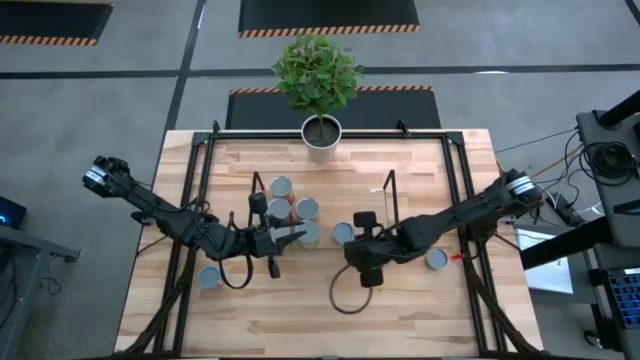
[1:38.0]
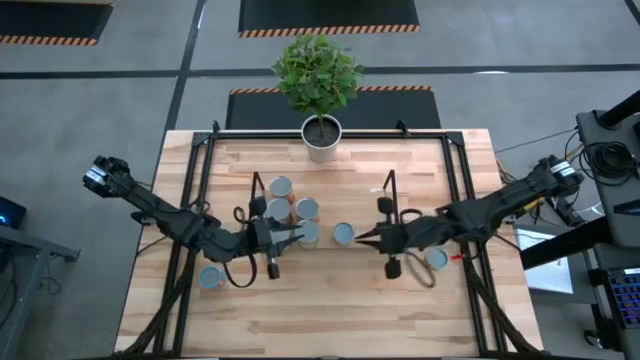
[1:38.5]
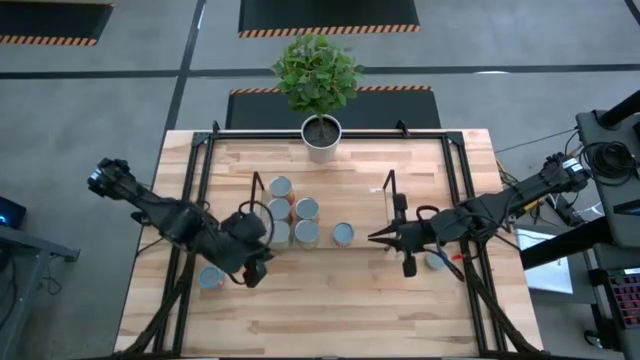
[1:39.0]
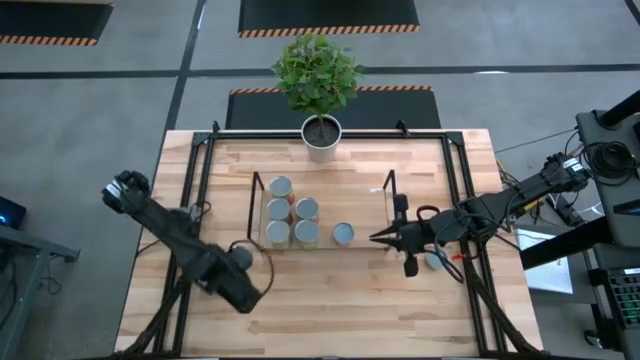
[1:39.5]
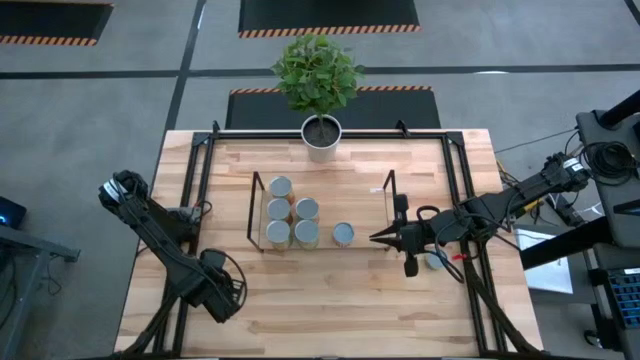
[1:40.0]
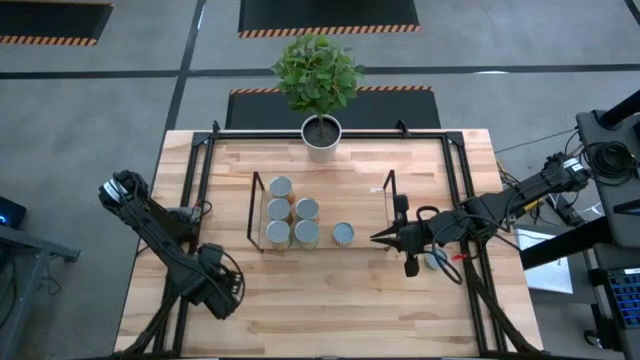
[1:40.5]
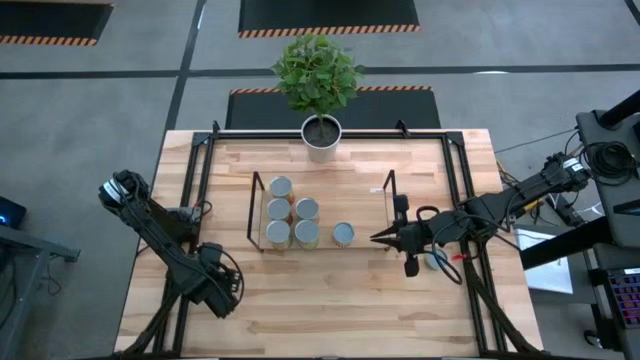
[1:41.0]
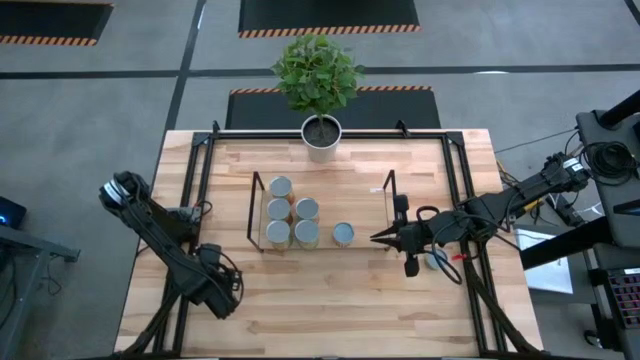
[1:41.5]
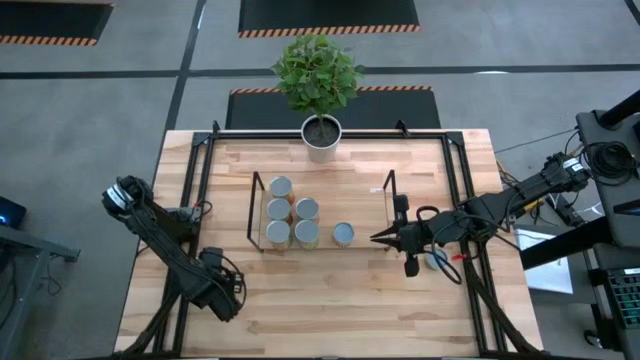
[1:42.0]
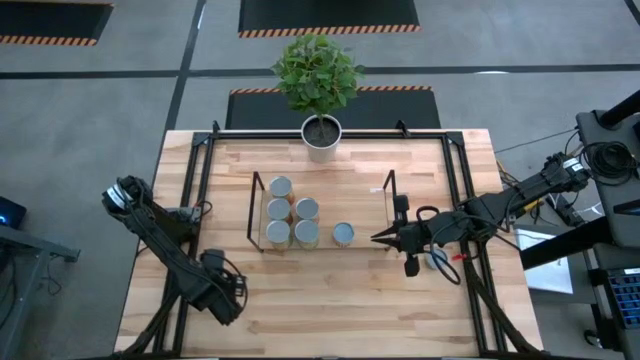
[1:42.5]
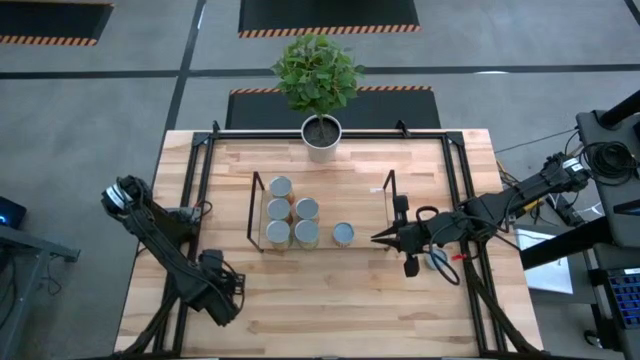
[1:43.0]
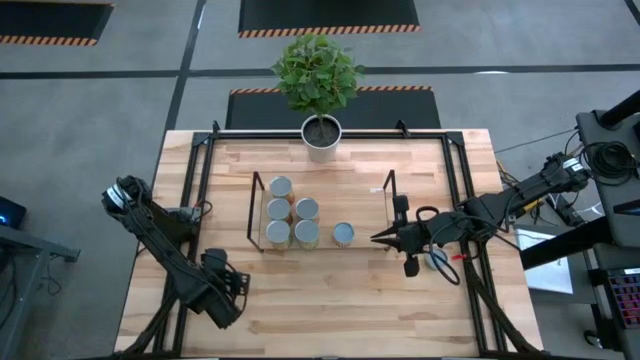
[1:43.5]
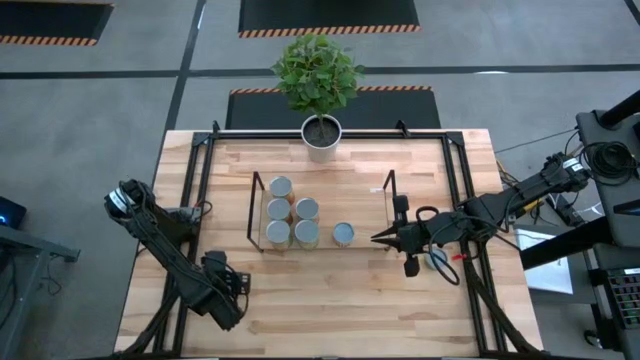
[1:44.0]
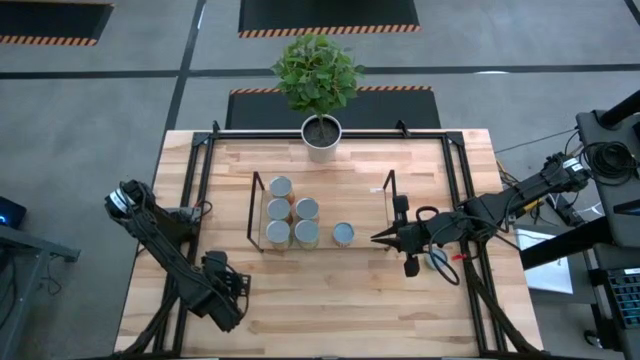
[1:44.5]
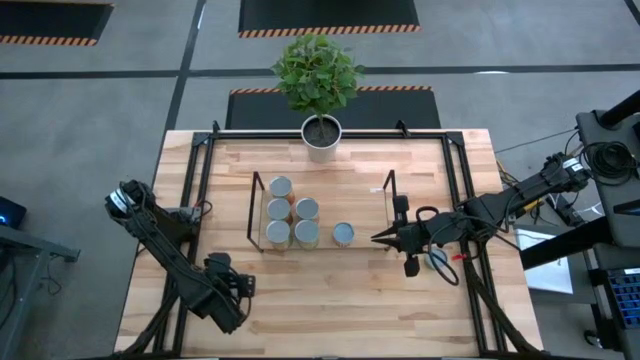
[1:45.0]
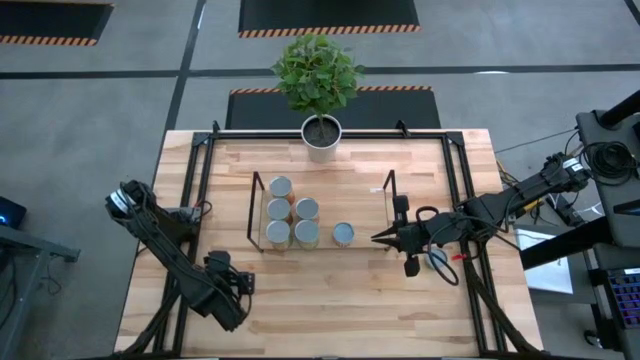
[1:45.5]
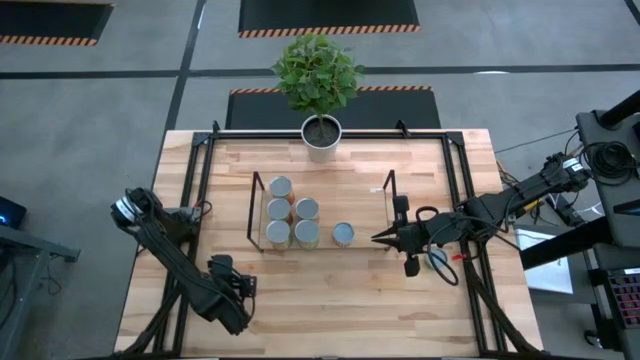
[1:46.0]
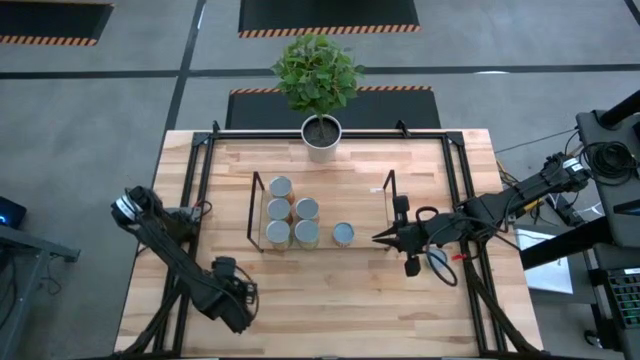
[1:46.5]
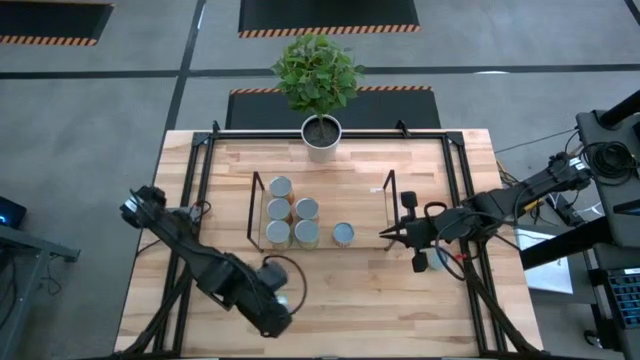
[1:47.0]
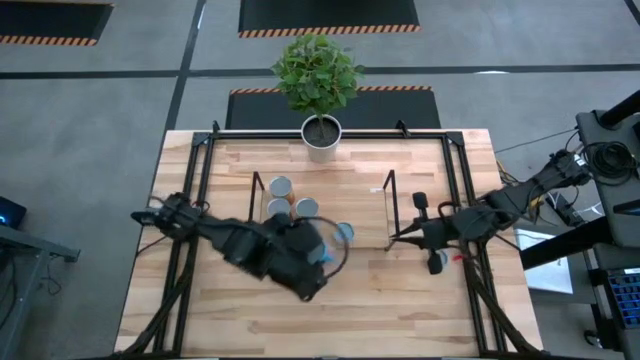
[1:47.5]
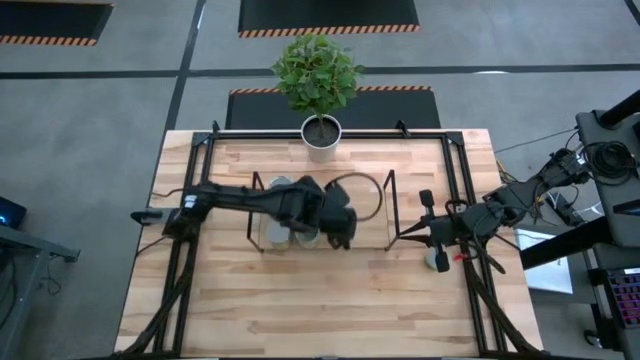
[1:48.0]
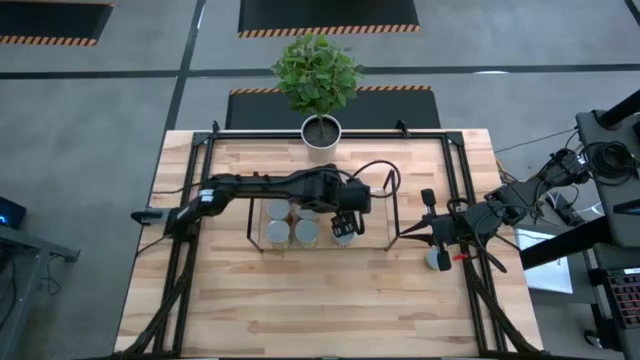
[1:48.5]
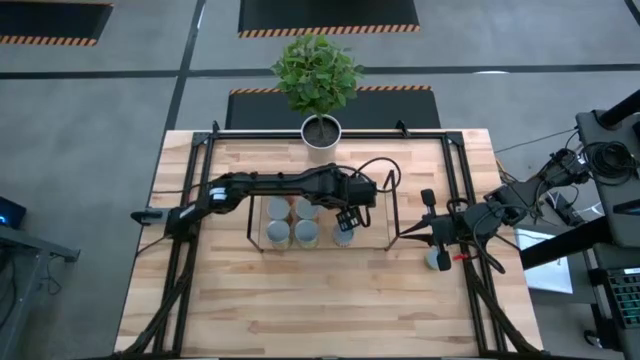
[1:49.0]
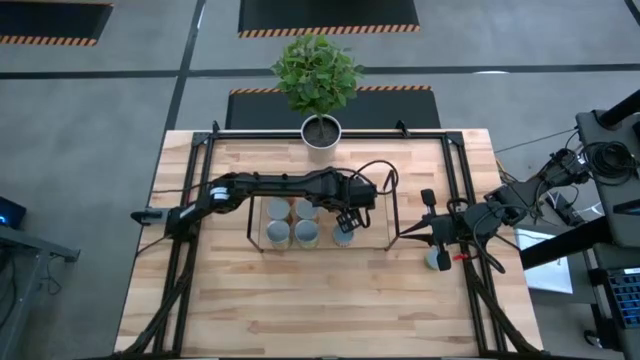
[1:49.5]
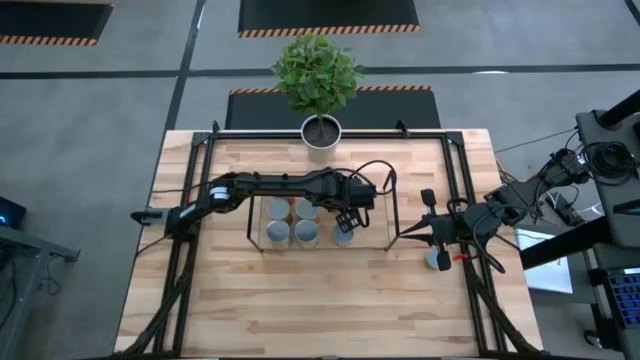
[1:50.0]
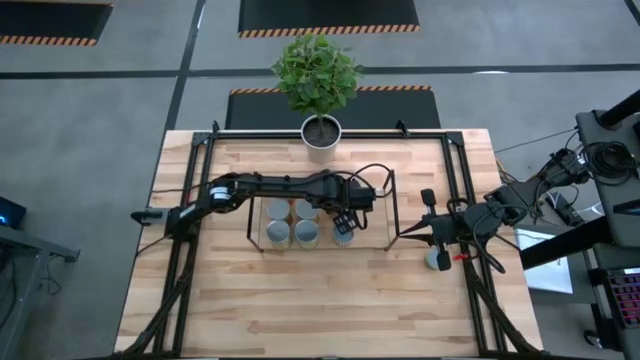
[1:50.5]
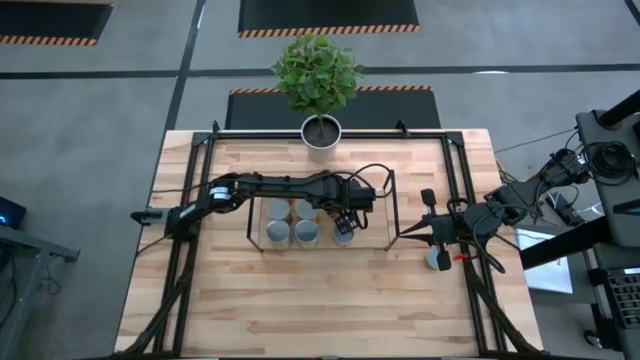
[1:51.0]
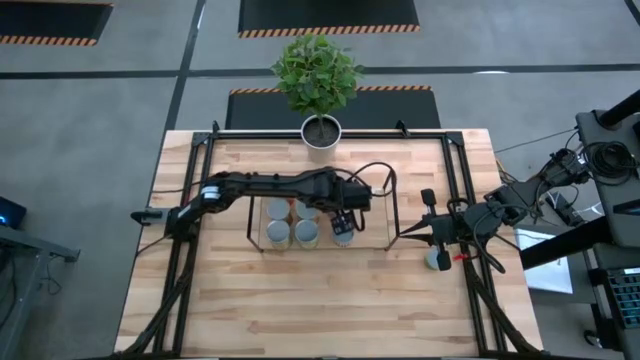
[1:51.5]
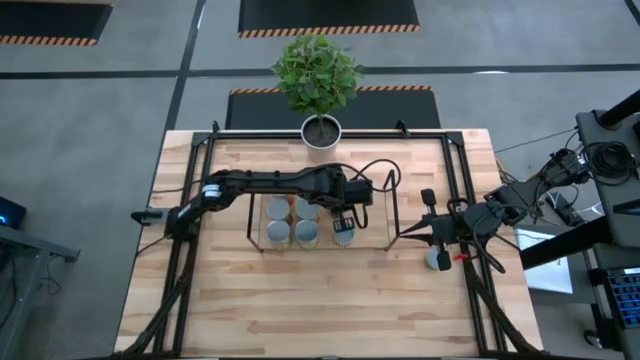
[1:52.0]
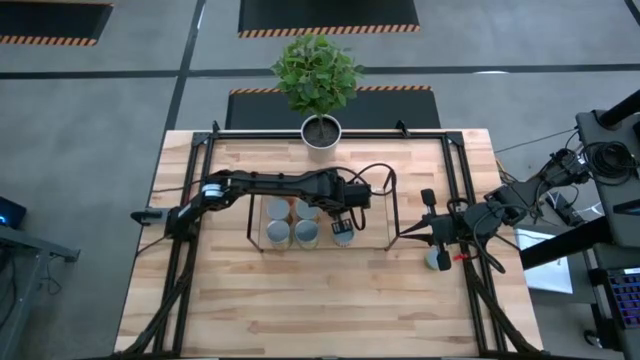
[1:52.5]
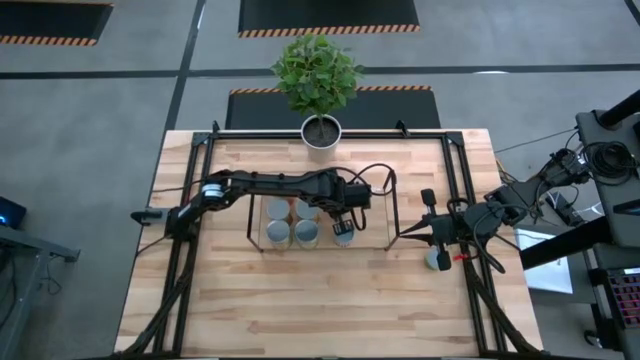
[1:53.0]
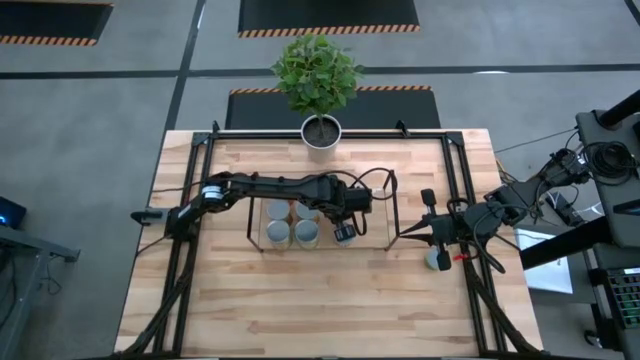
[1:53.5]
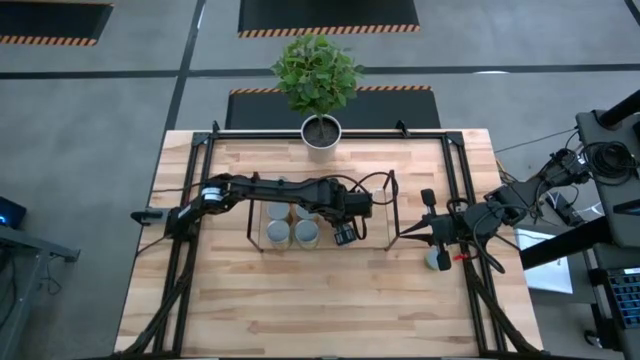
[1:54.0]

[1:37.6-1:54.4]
Task: Pick and place cans onto a shelf
Put the mixed corn on the shelf

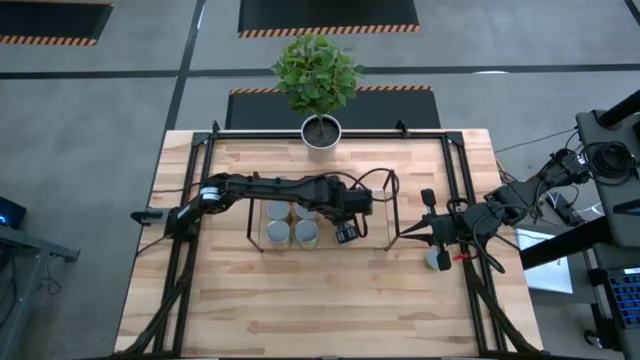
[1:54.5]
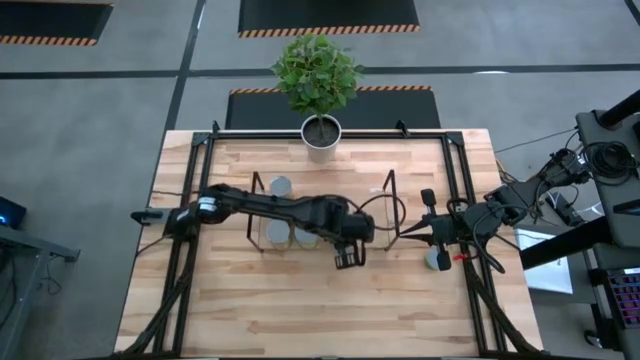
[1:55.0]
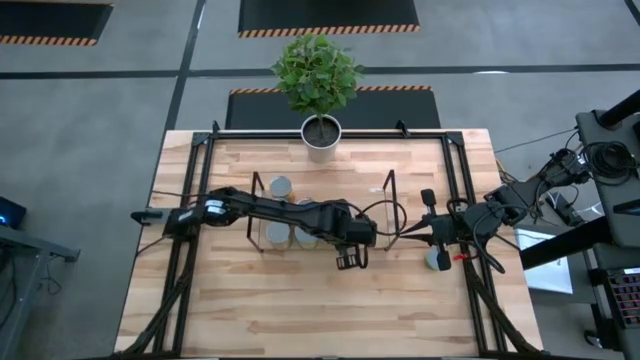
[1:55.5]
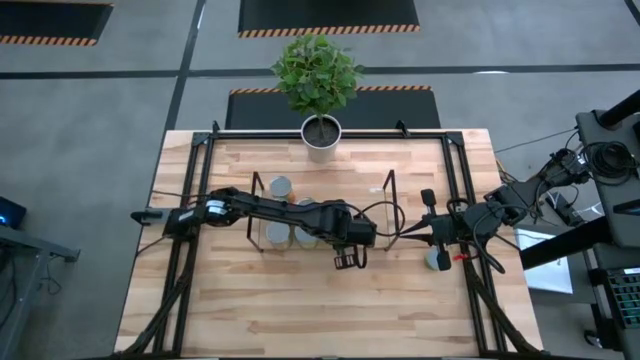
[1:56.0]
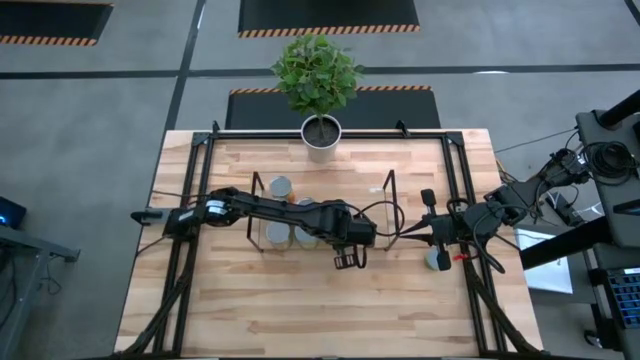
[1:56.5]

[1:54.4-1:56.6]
Adjust the canned spicy black beans on the shelf

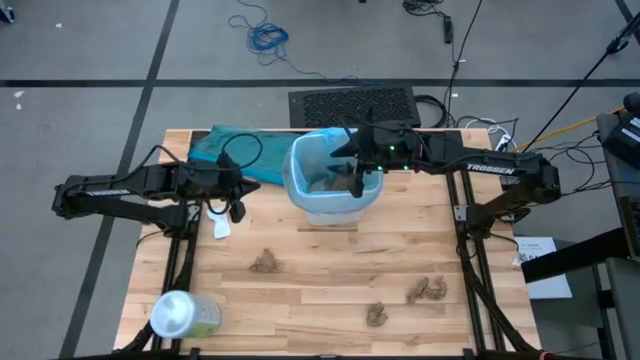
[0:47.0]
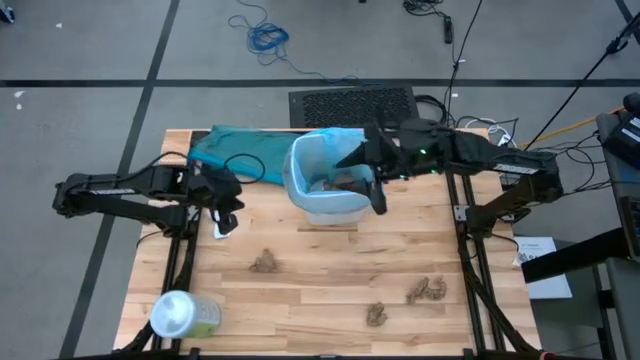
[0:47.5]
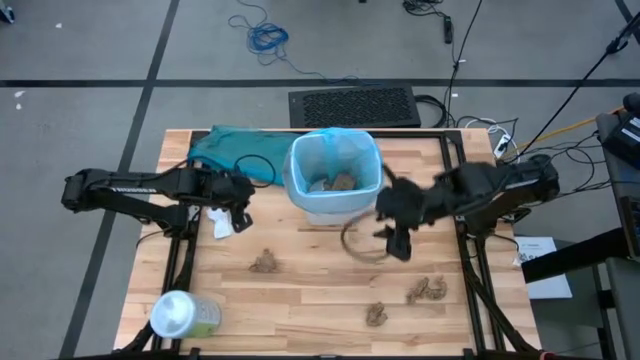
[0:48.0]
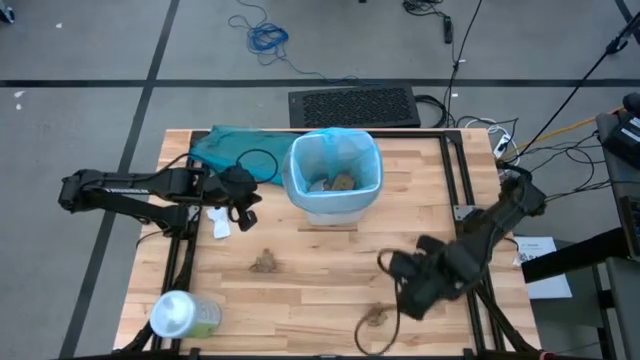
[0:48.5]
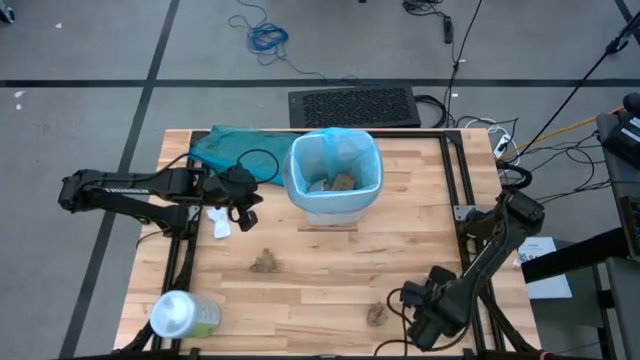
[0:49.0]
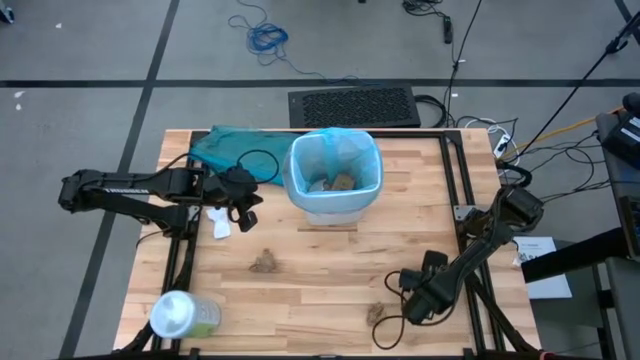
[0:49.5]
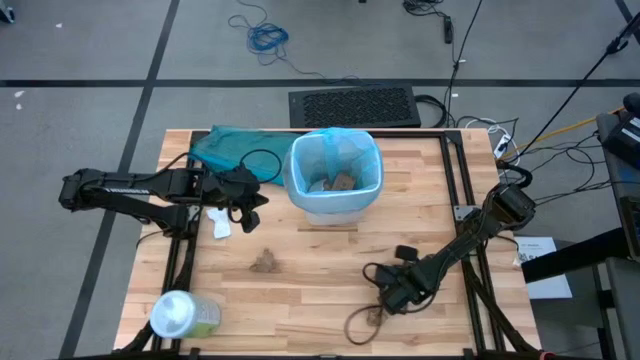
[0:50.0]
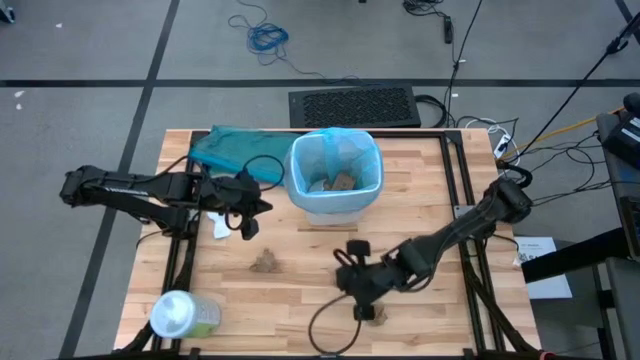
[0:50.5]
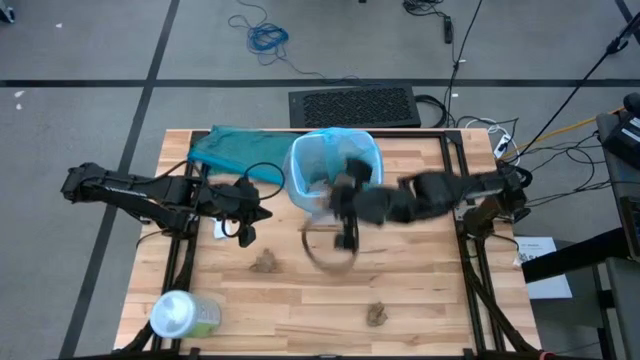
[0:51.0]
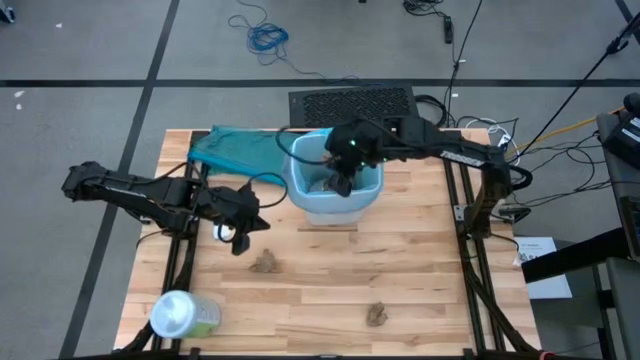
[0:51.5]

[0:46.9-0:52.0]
Task: place trash/remove bag and relplace
Put the brown napkin into the trash bin
